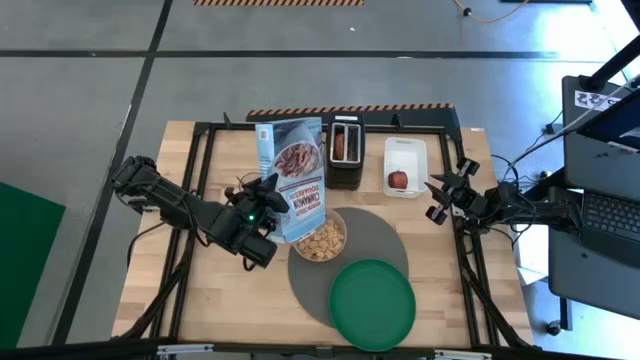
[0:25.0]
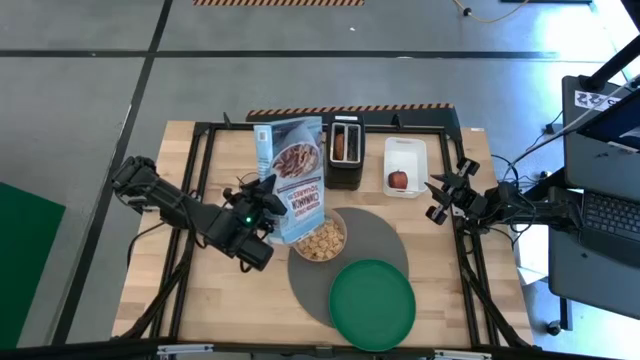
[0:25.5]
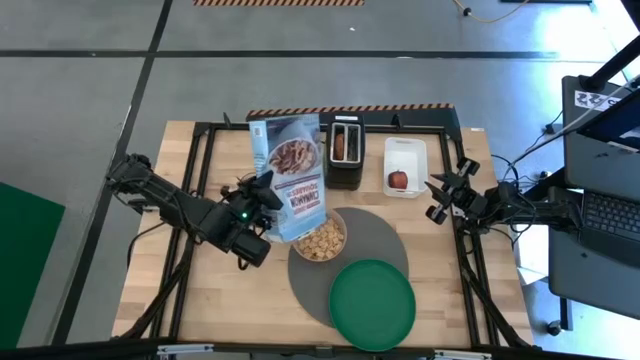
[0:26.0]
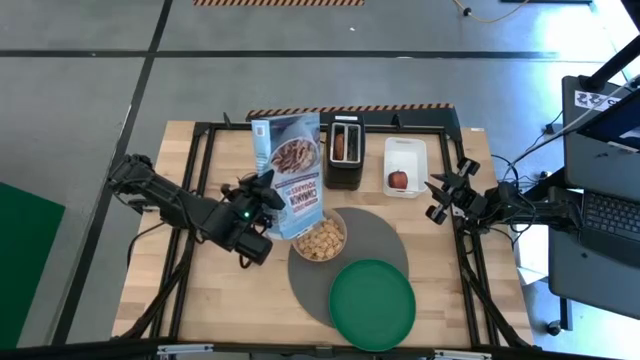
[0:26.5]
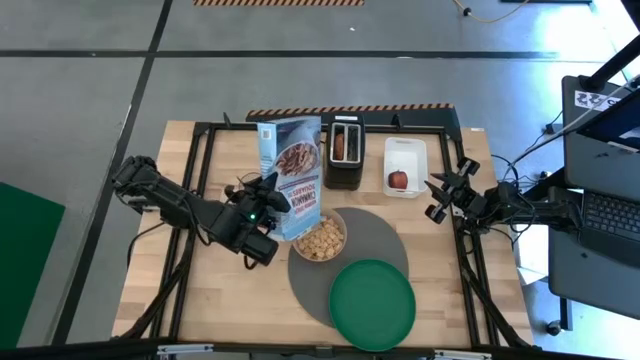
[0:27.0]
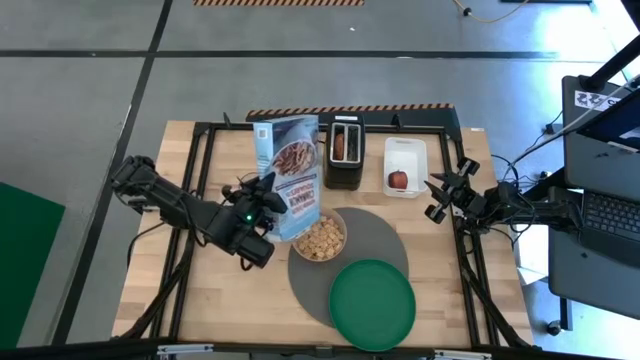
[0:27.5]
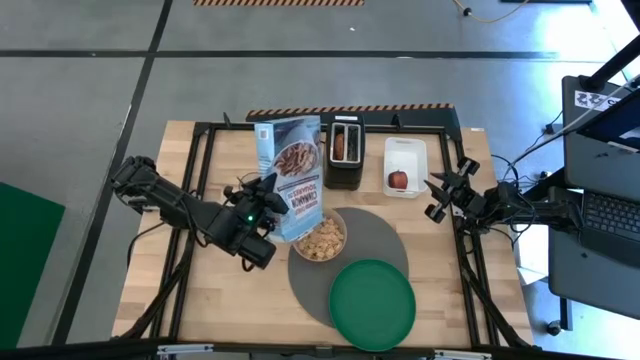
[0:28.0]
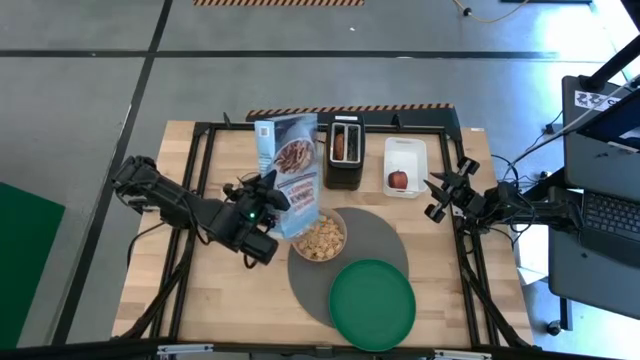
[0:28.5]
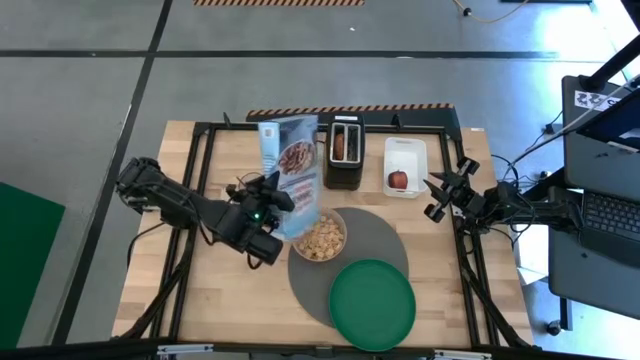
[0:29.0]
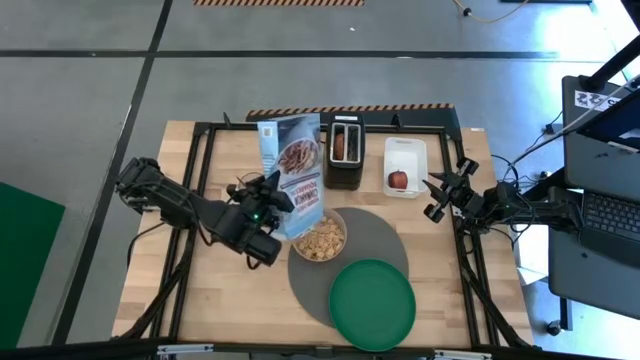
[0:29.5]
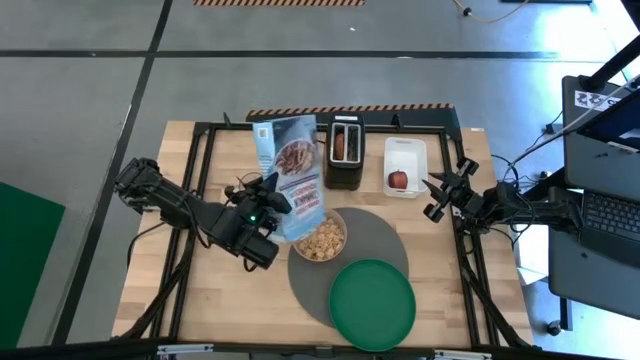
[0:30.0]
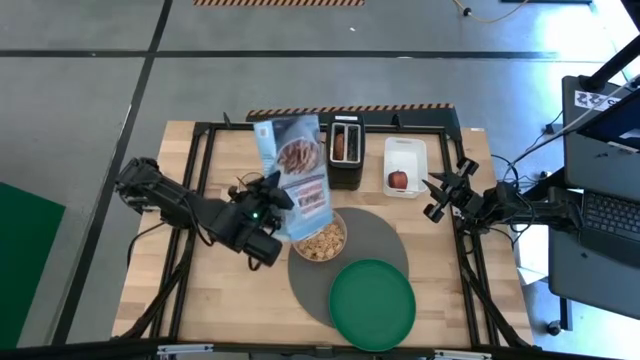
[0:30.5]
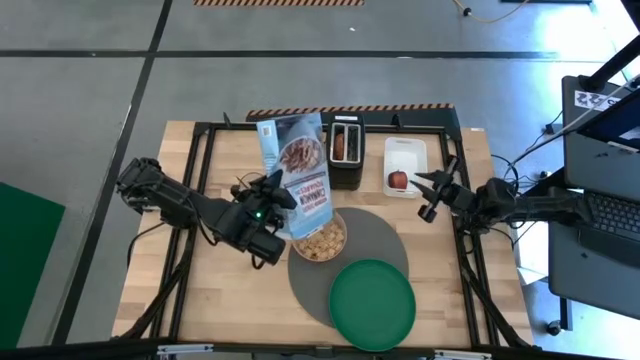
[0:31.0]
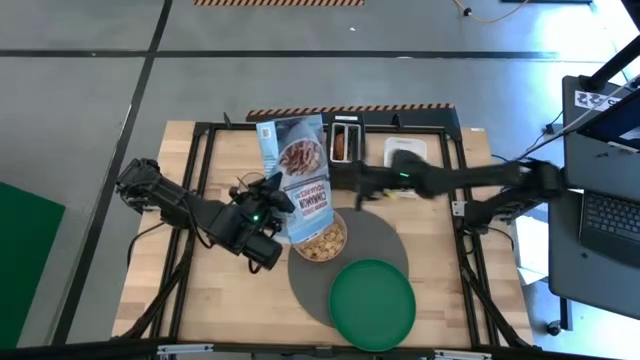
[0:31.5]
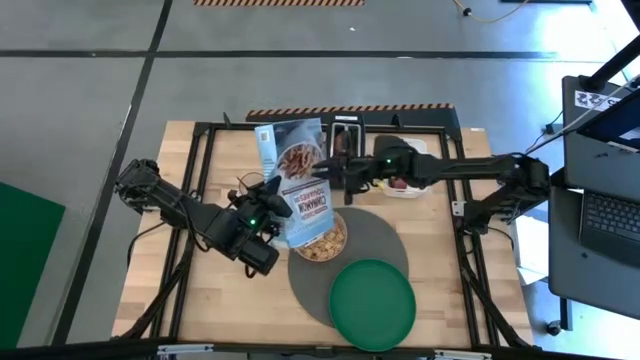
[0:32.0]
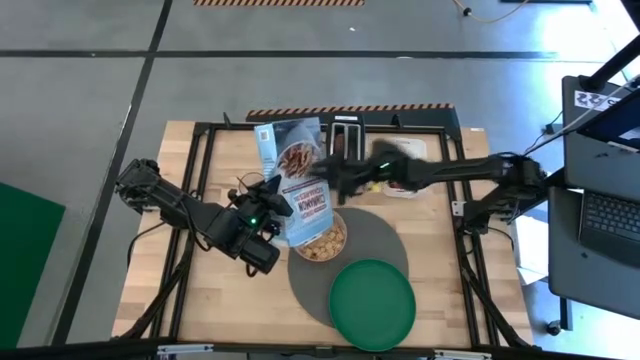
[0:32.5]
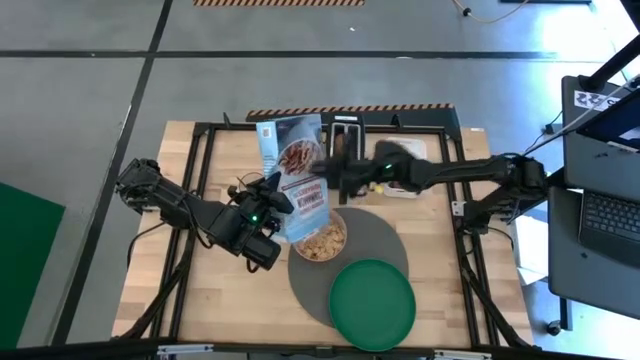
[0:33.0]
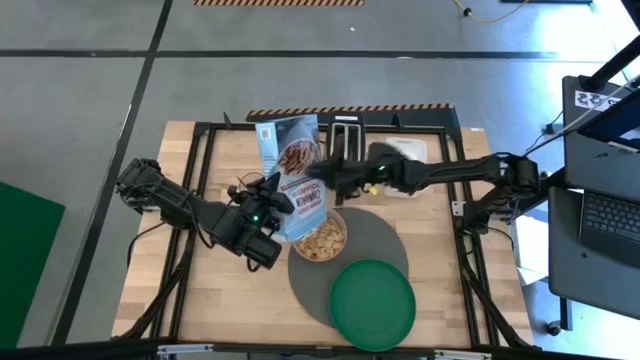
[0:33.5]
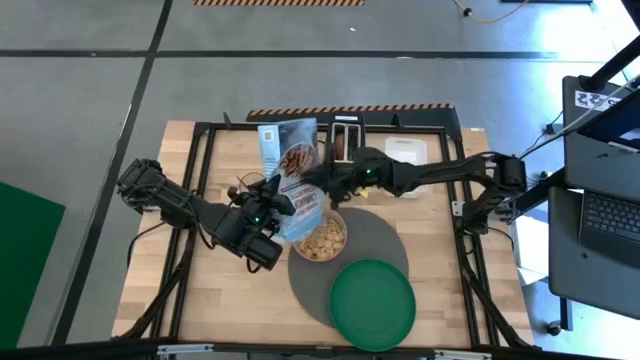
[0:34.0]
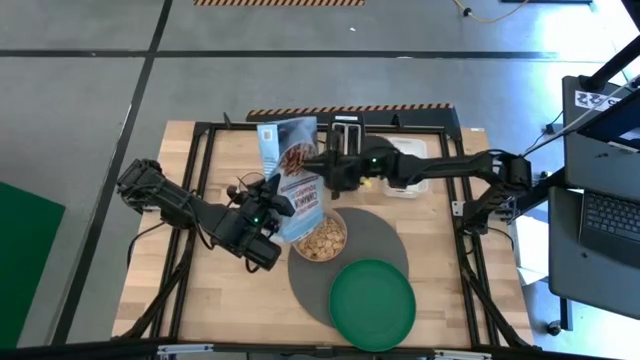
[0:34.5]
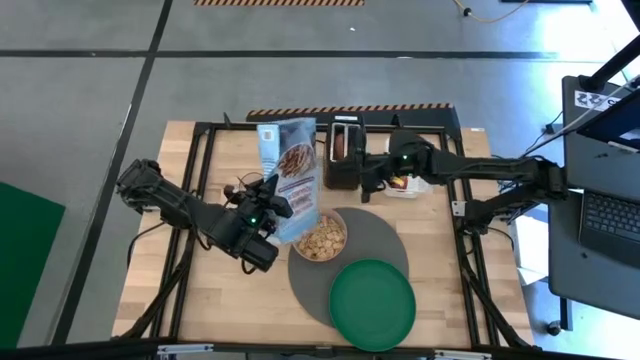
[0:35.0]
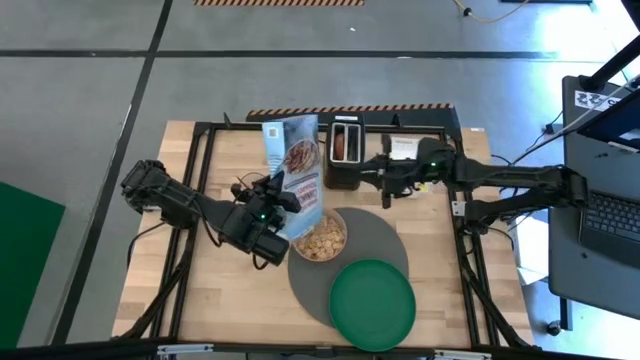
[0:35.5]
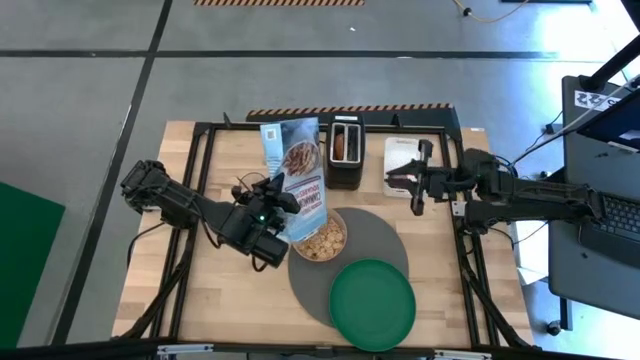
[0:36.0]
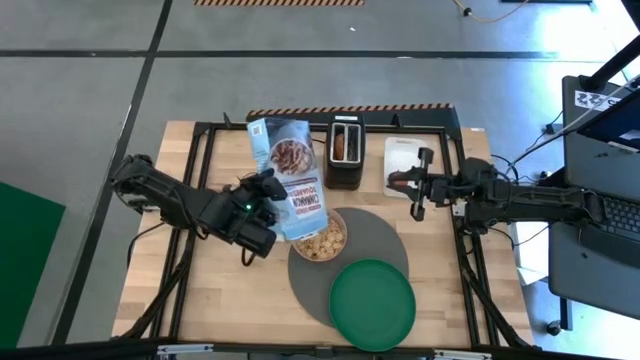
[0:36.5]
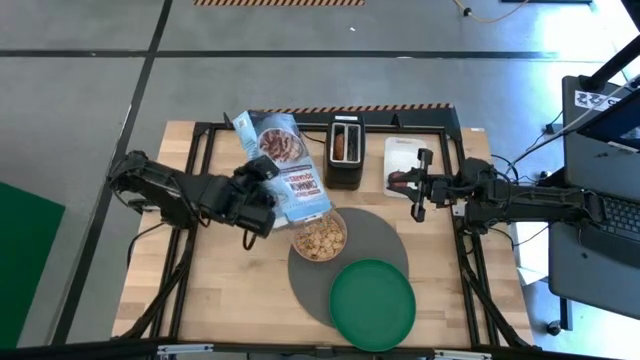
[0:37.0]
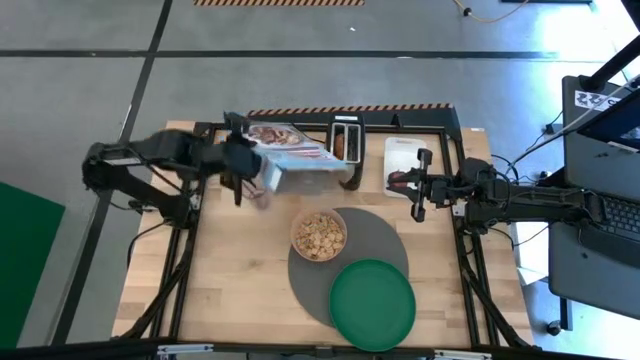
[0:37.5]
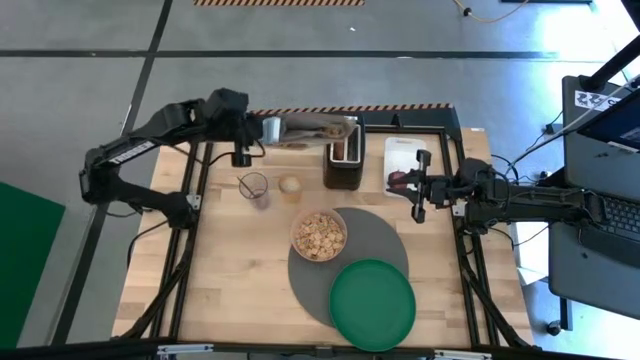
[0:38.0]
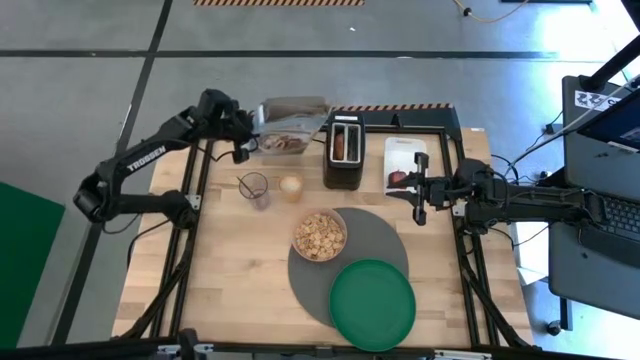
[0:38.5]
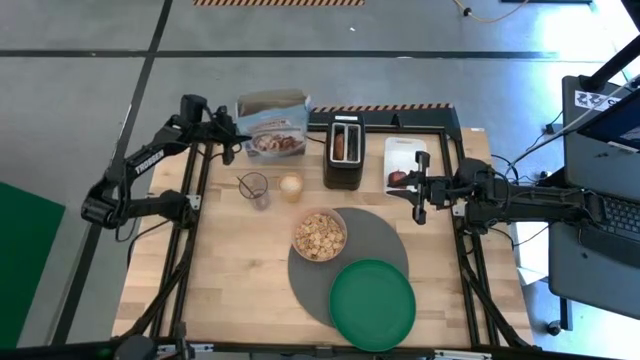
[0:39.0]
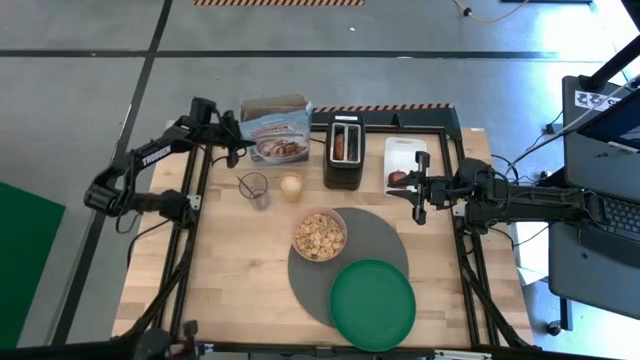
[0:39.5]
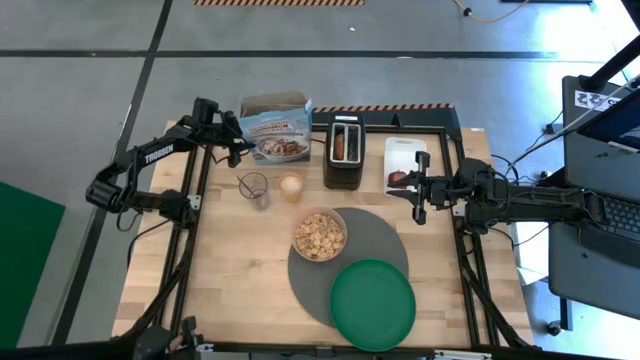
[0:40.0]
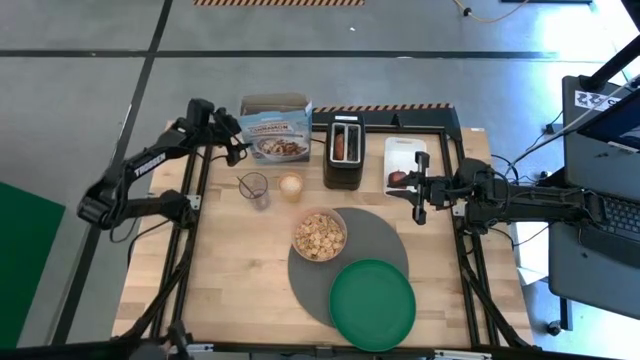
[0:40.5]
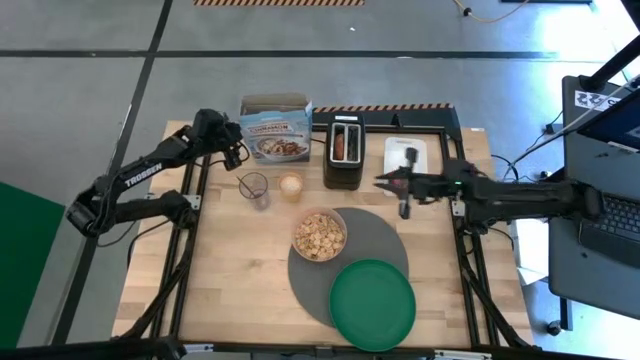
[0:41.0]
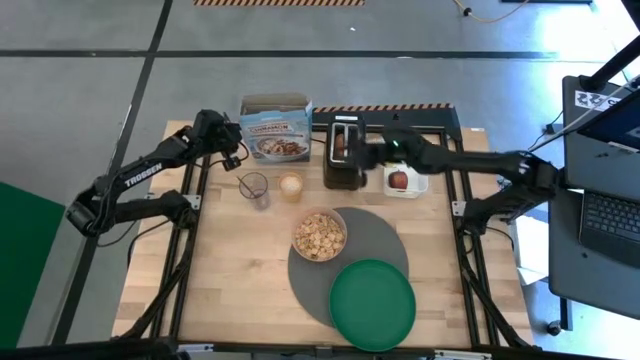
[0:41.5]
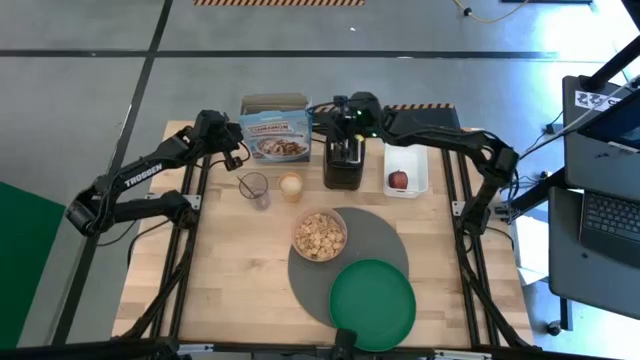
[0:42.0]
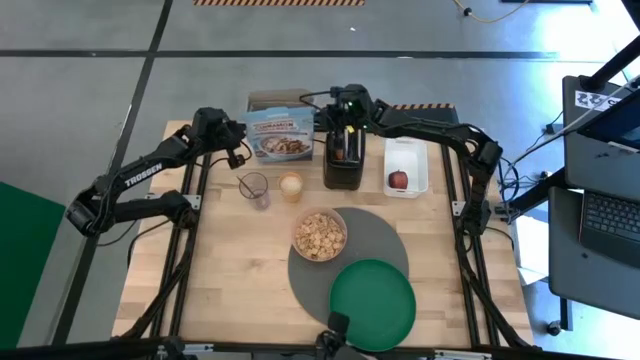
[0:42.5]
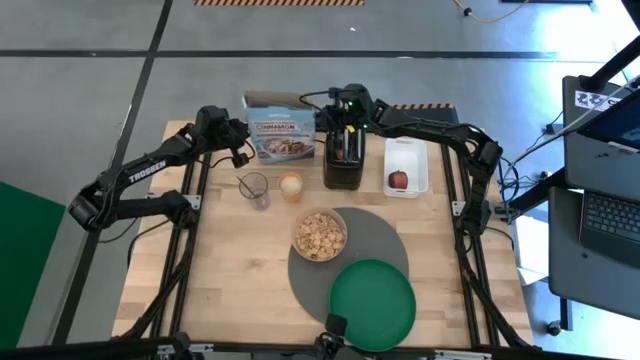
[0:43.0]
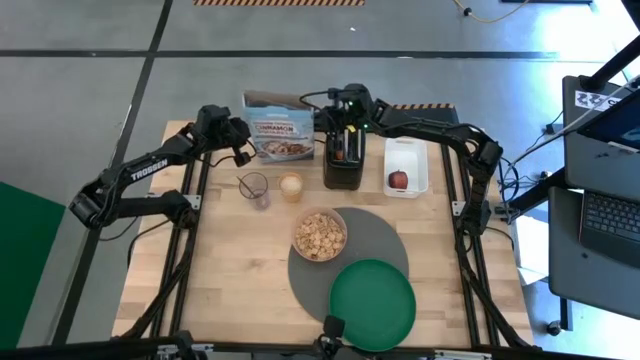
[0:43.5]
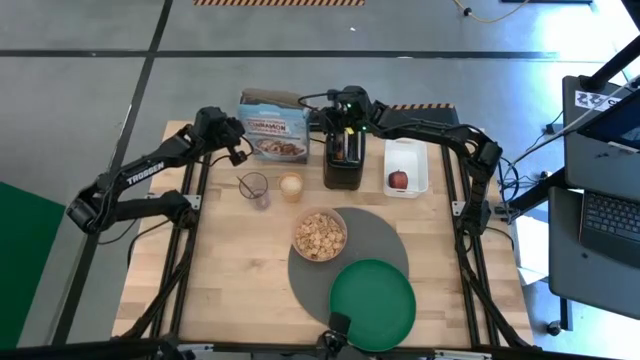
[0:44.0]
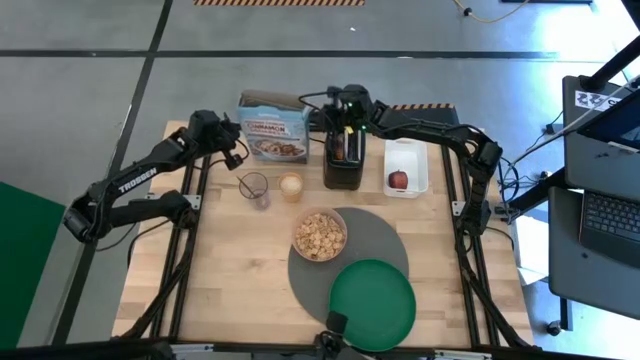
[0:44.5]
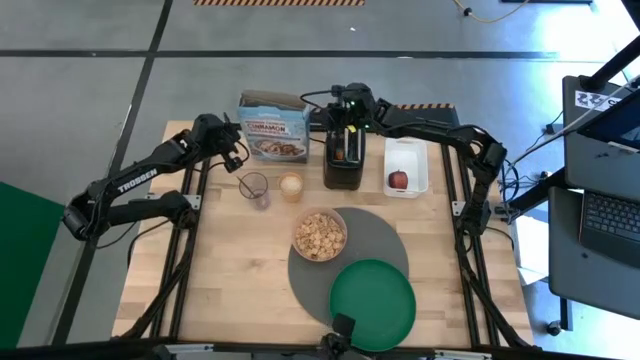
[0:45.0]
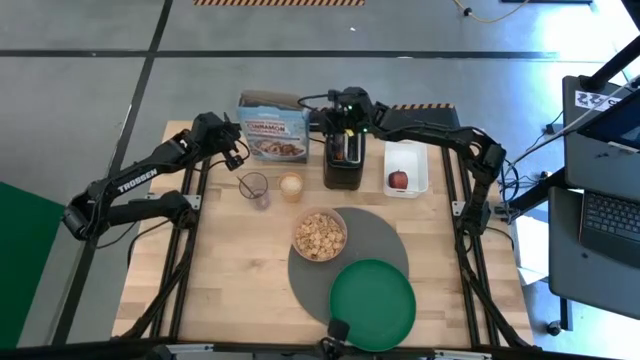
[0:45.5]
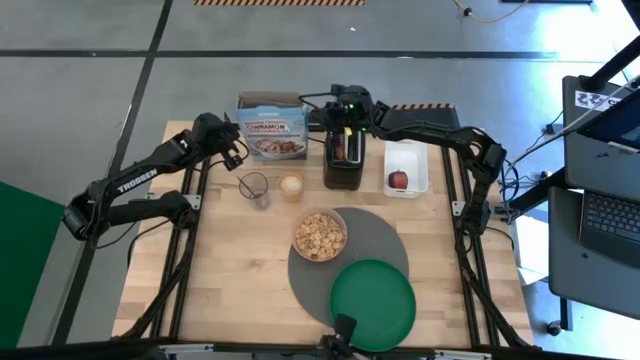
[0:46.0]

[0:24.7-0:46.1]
Task: Arrange a breakfast setting
Pour the cereal from the cereal box into the pink bowl
